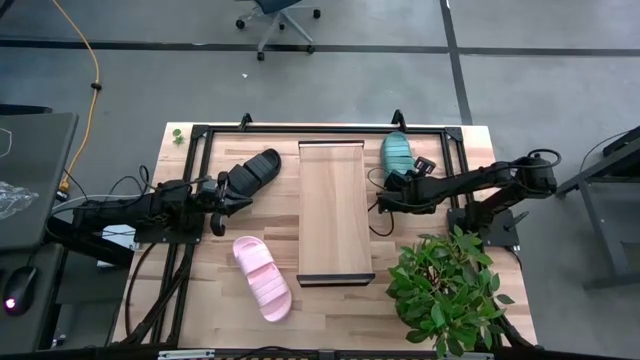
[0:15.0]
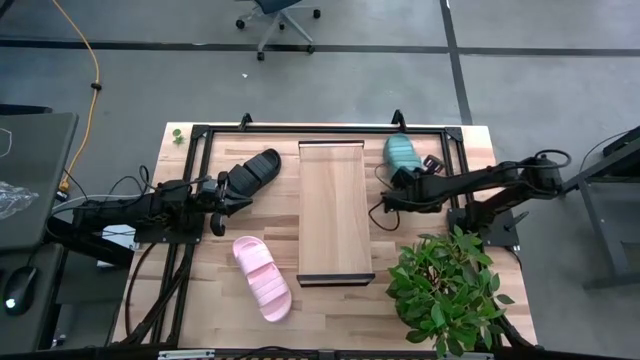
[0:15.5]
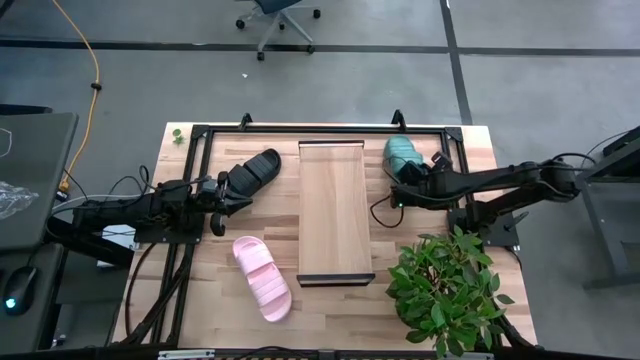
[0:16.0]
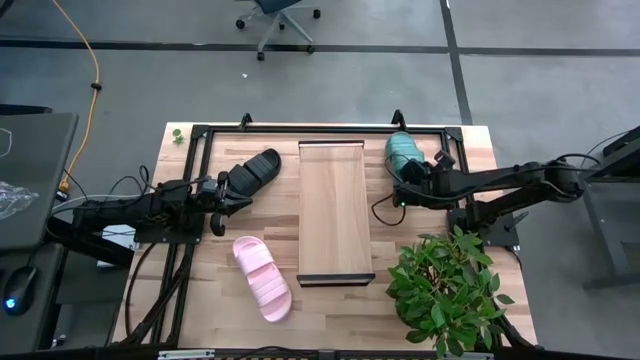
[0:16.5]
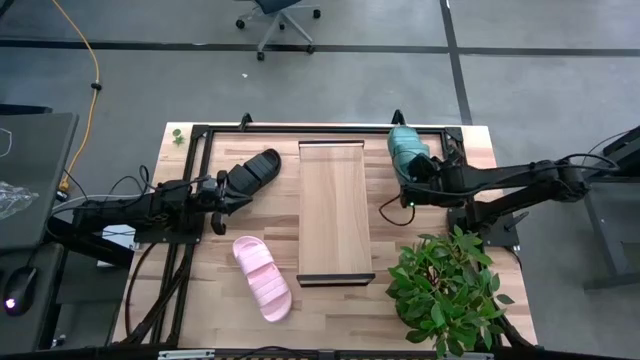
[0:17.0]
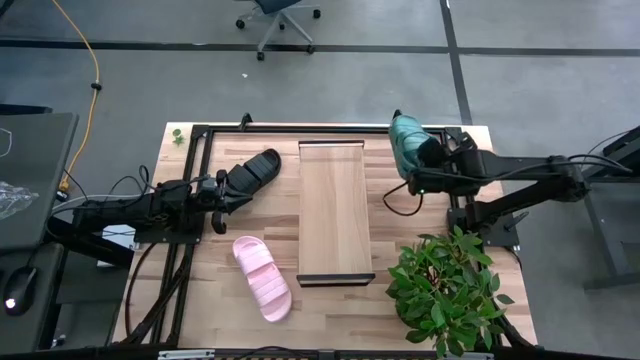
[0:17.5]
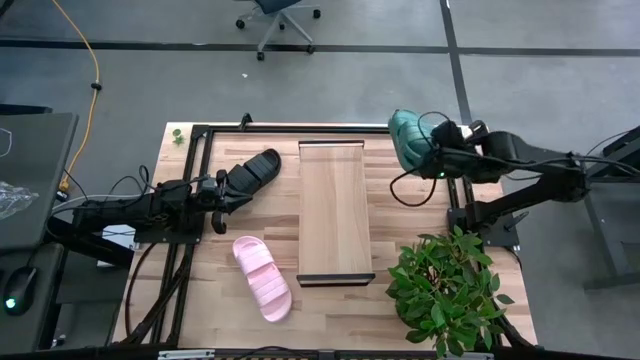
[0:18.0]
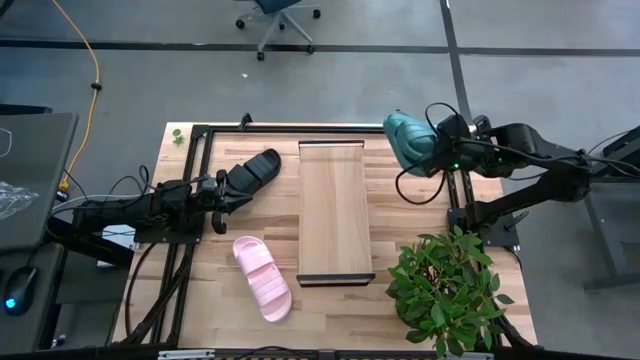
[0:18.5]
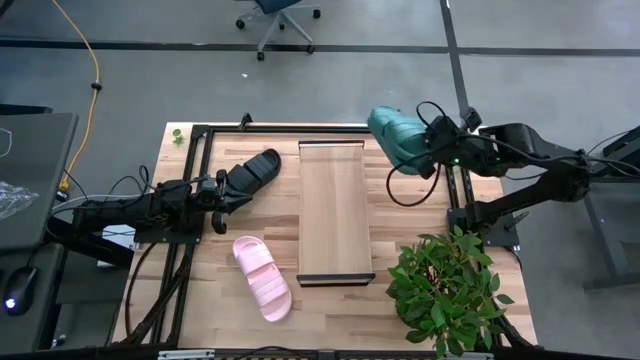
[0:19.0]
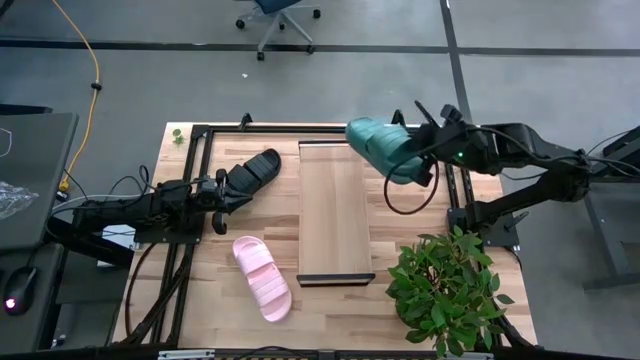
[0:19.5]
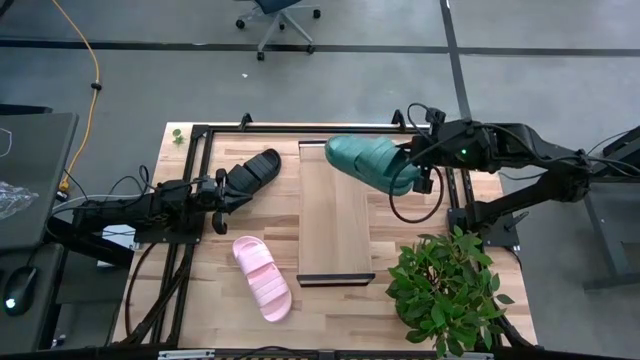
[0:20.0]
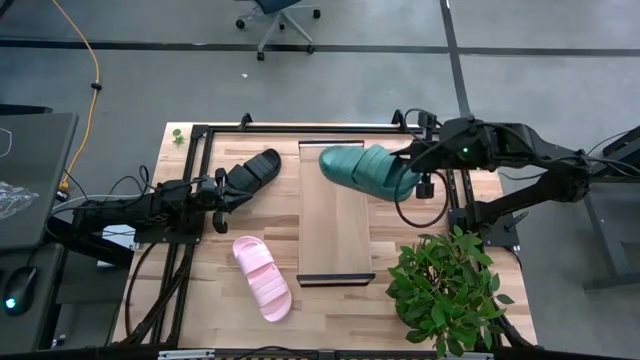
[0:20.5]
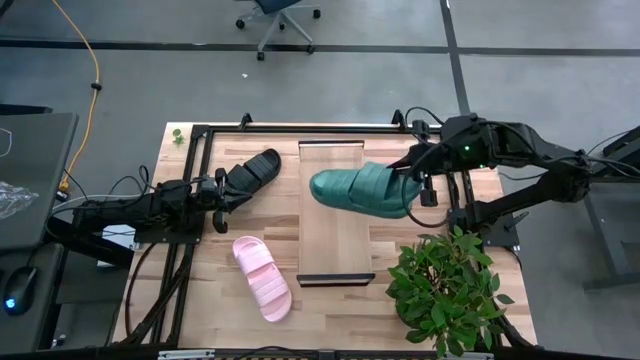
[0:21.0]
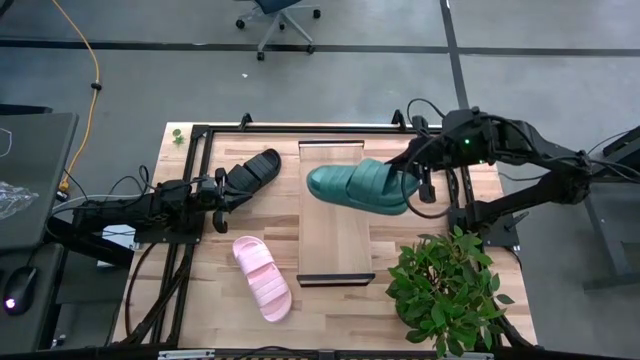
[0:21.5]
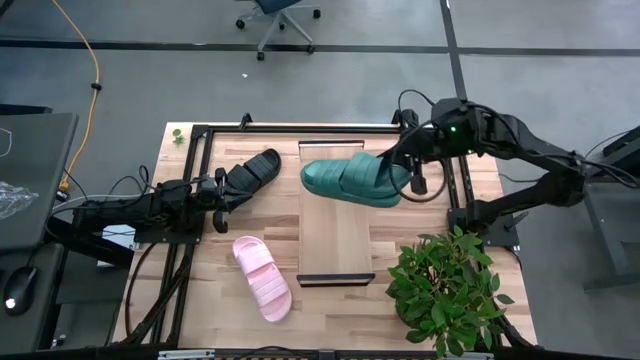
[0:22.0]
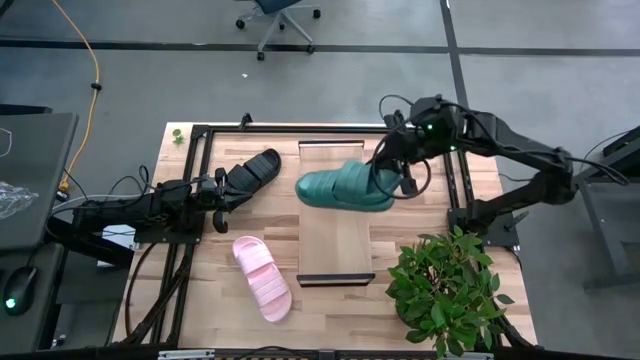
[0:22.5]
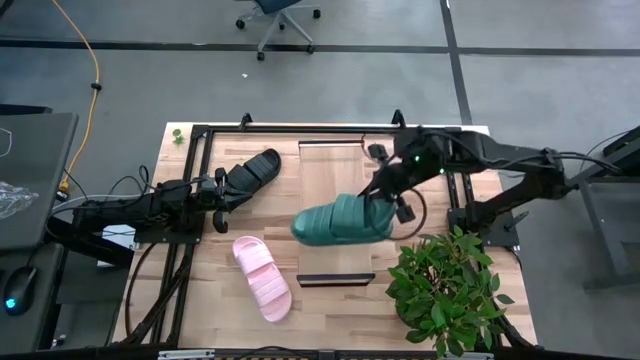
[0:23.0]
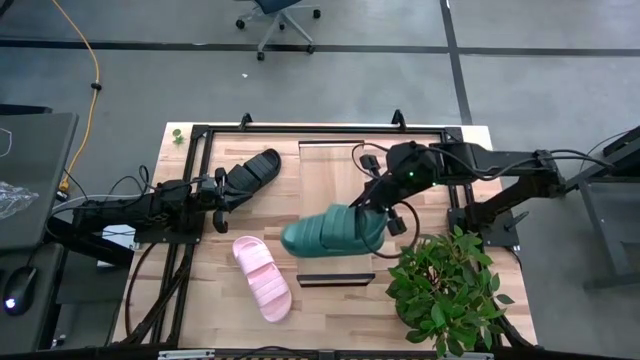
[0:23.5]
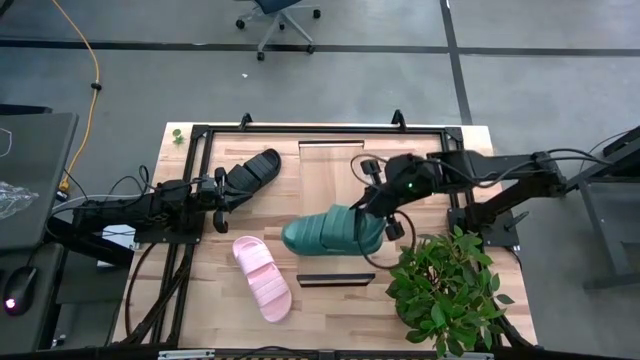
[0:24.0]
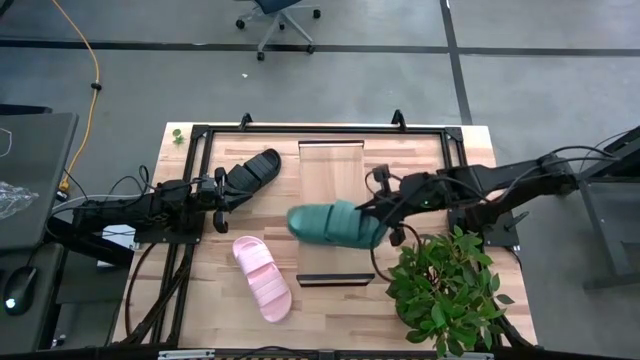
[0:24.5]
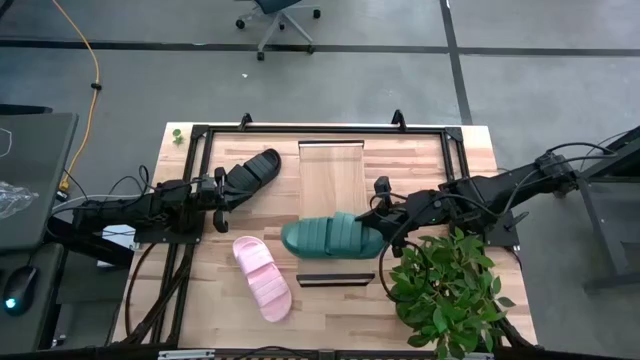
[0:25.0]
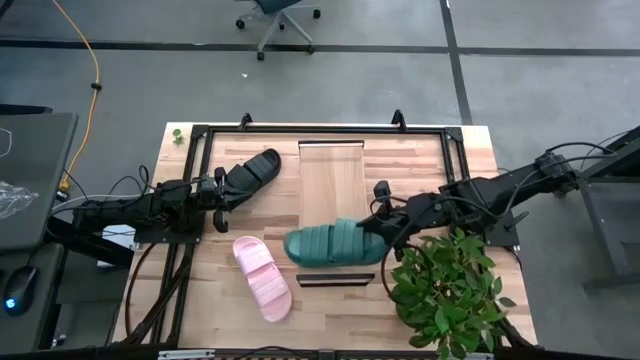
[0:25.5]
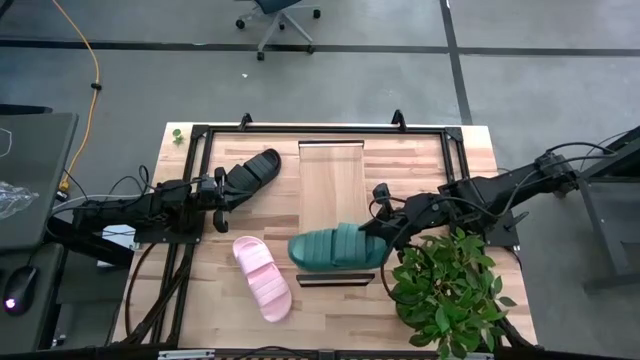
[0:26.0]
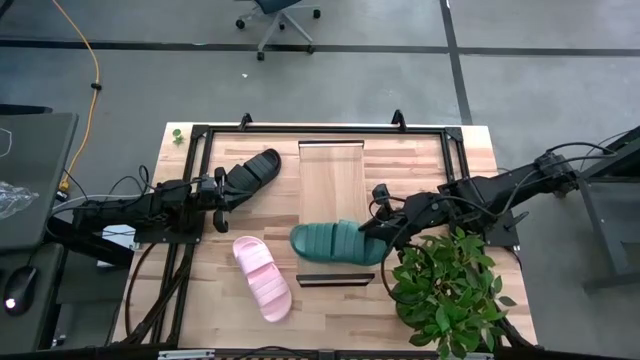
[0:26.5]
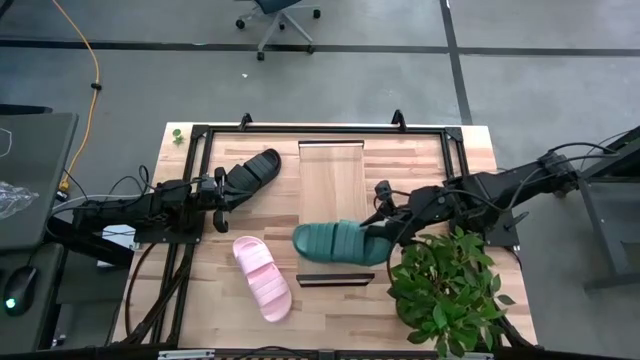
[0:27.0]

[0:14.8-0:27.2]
Task: Pick and place slippers onto the shelf
Put the green pair of slippers on the shelf

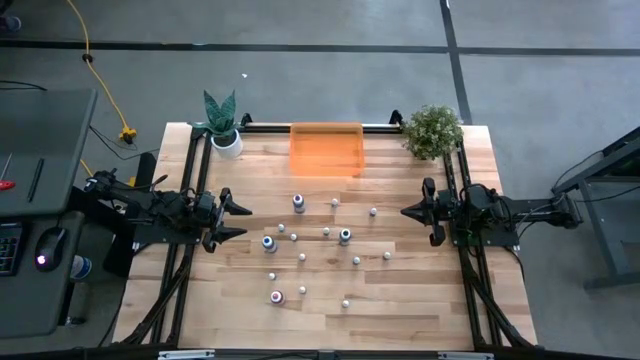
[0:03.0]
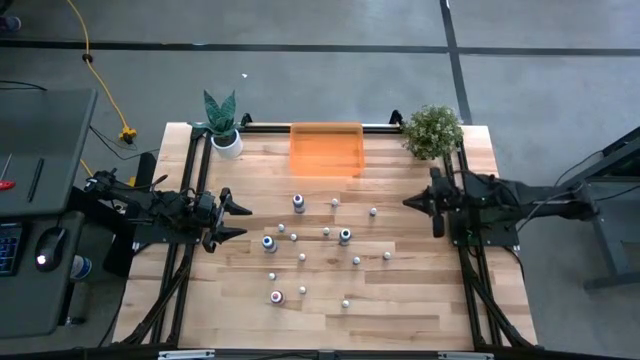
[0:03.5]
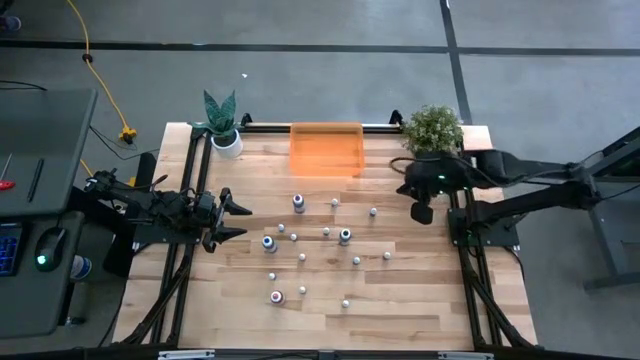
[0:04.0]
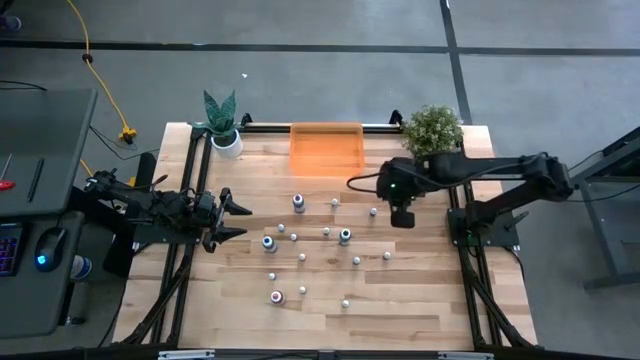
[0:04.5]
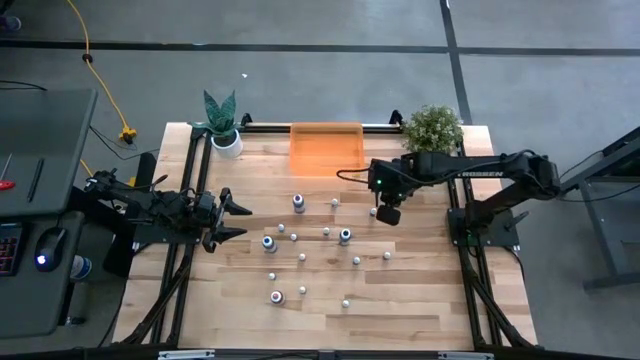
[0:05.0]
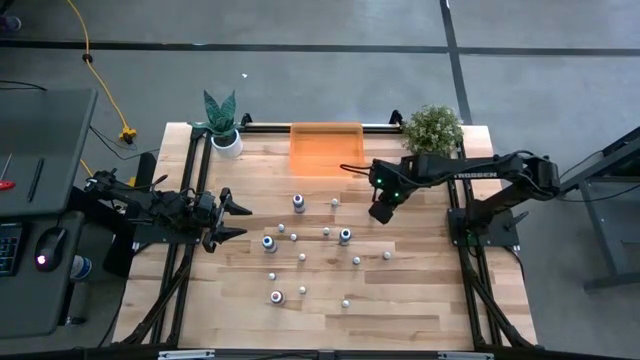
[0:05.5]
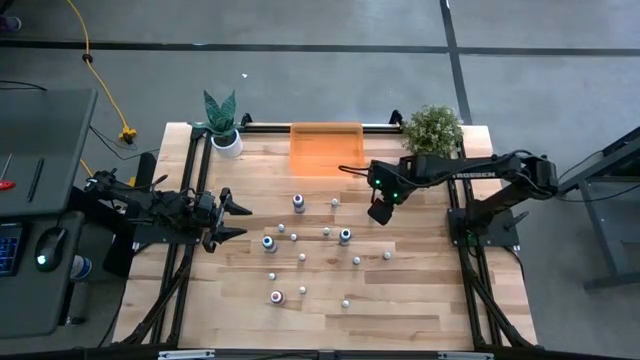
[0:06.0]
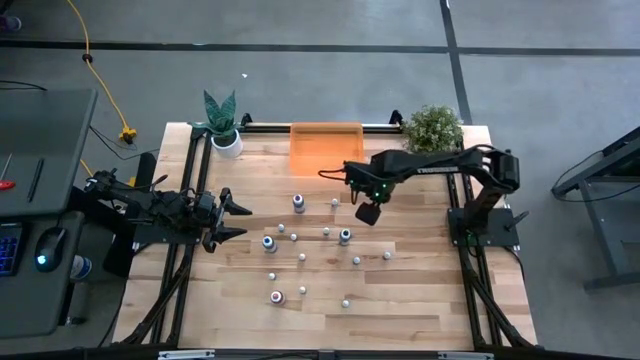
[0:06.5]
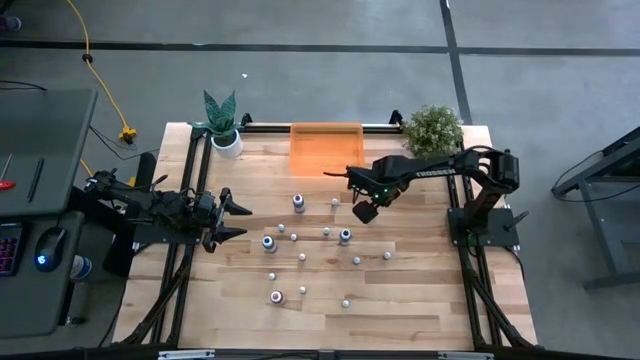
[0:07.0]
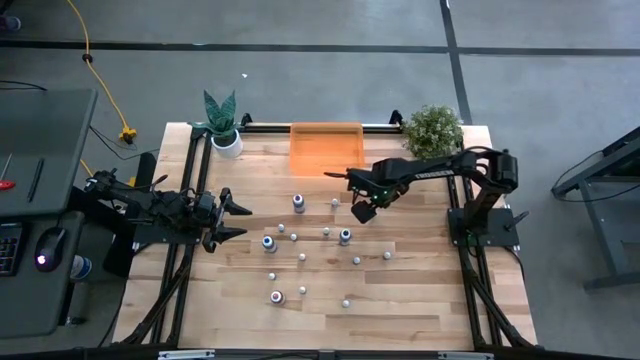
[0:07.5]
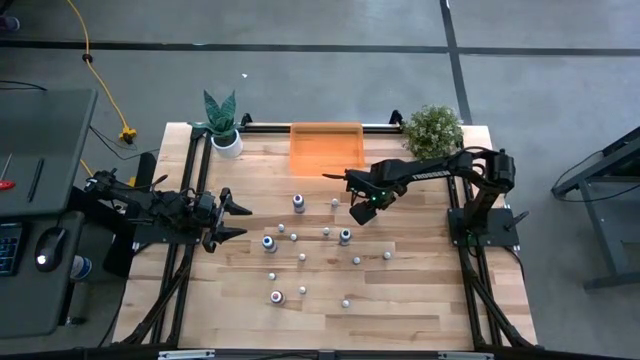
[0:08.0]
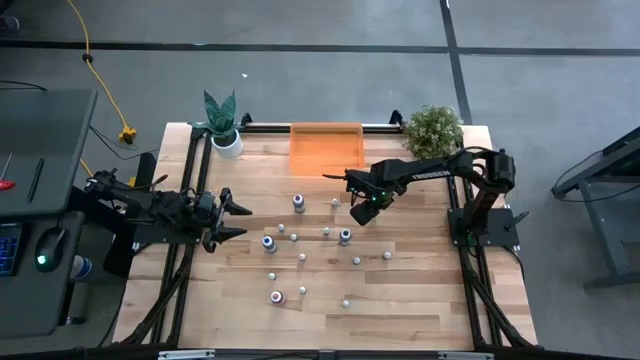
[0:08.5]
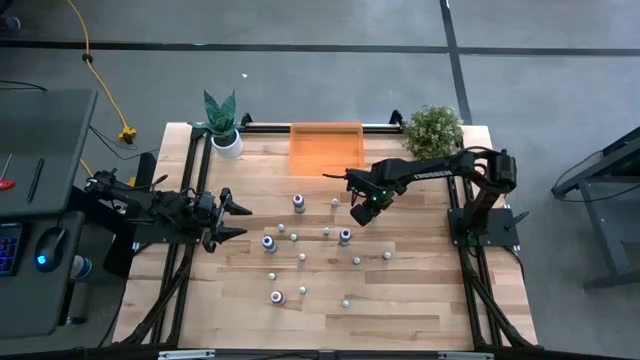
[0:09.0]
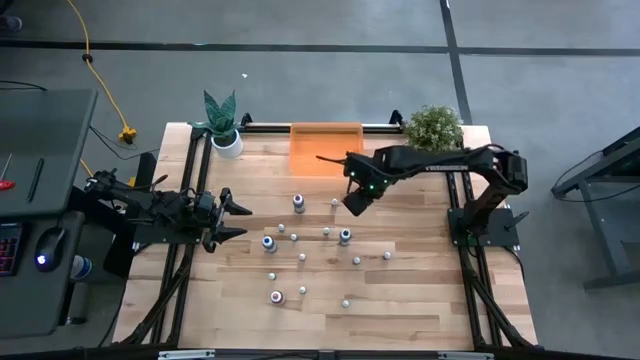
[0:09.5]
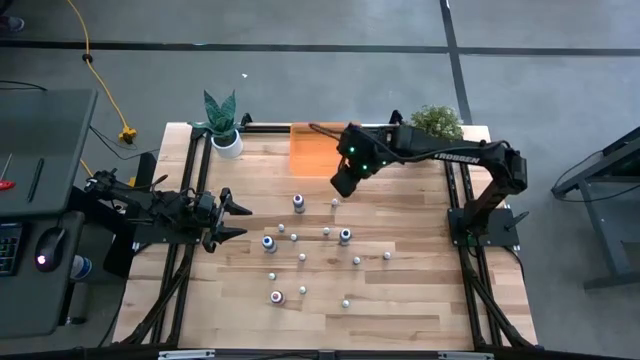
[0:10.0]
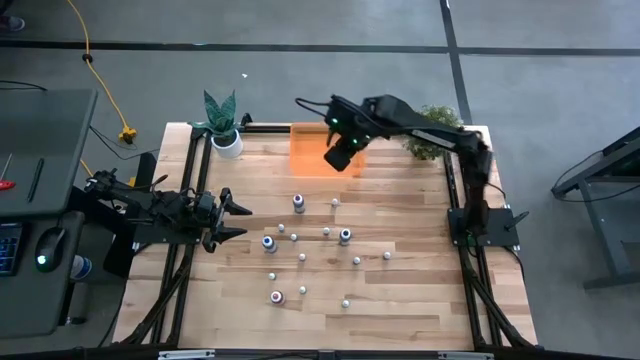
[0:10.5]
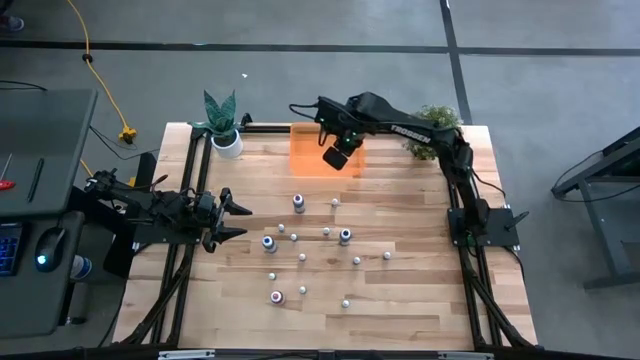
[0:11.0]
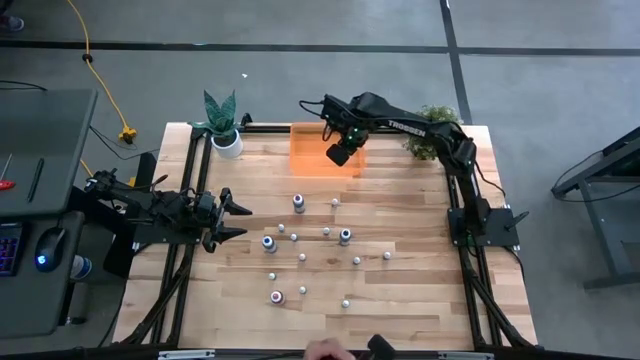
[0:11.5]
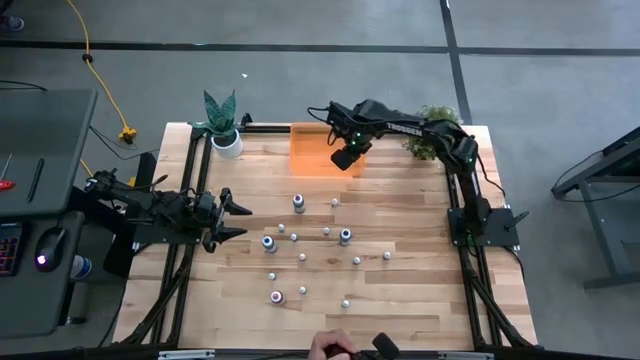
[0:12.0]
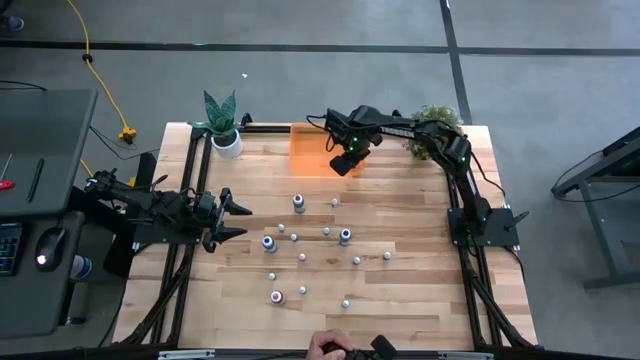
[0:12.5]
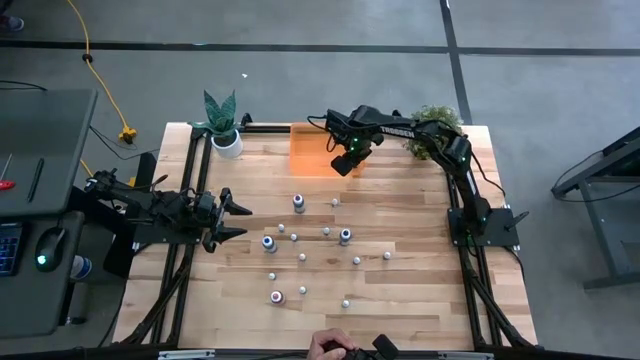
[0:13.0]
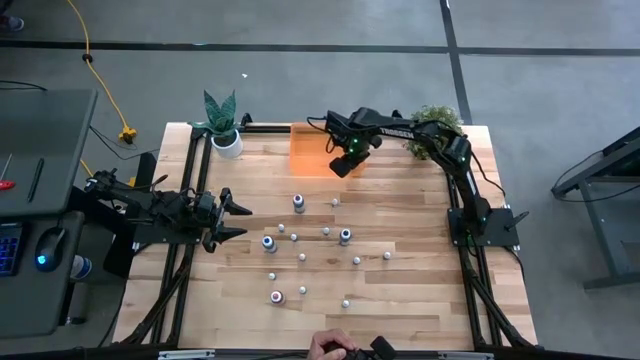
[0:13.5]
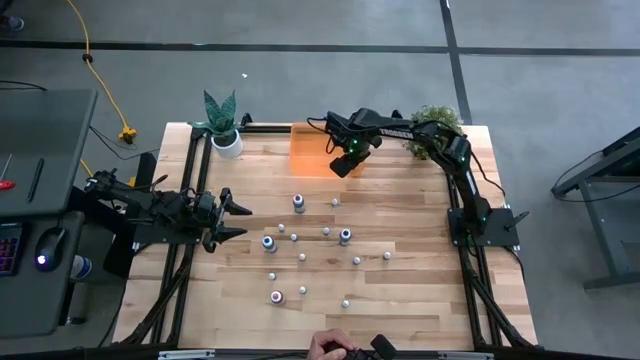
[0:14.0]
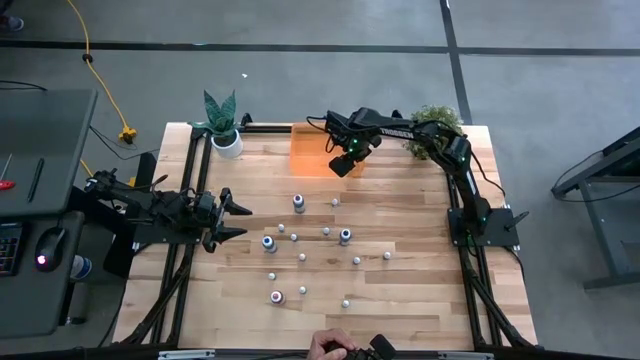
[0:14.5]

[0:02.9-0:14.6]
Task: Pick & Place food coloring
Put the small black food coloring bottle into the orange bin
